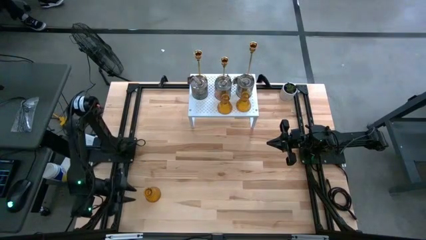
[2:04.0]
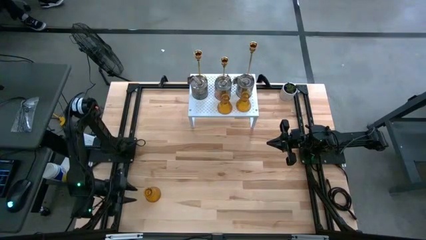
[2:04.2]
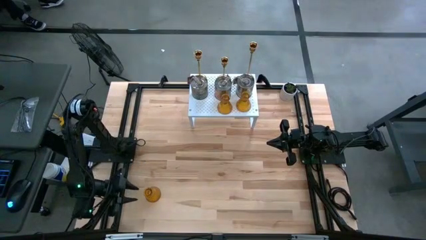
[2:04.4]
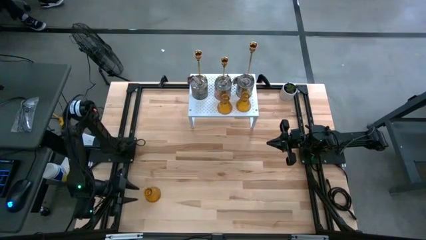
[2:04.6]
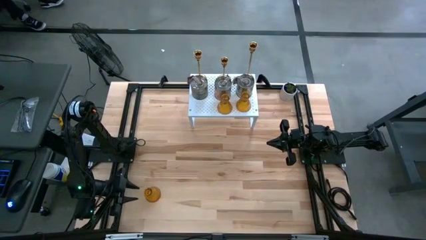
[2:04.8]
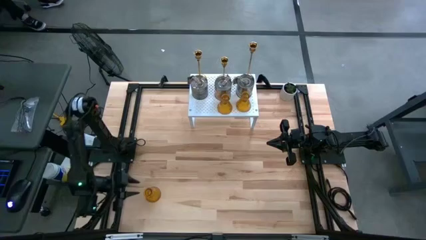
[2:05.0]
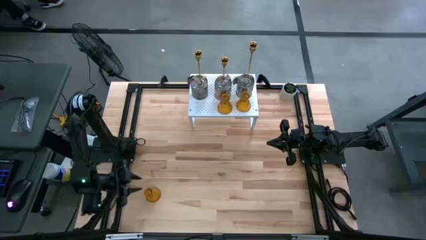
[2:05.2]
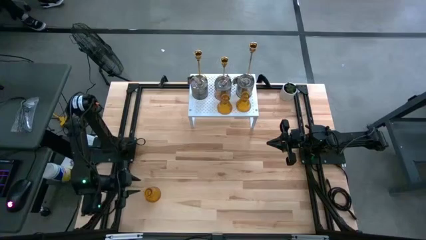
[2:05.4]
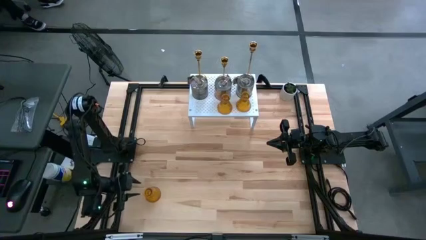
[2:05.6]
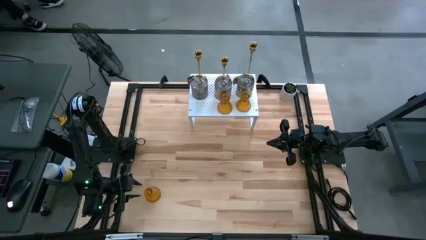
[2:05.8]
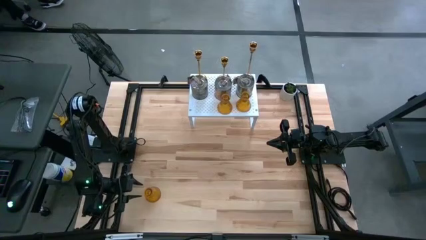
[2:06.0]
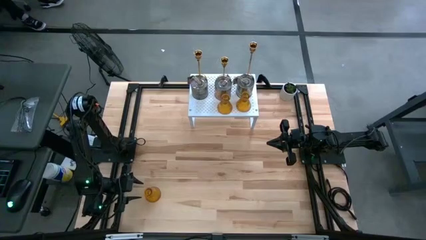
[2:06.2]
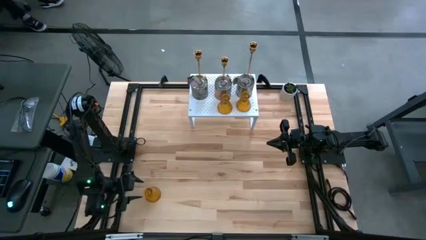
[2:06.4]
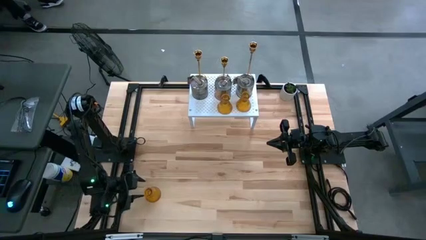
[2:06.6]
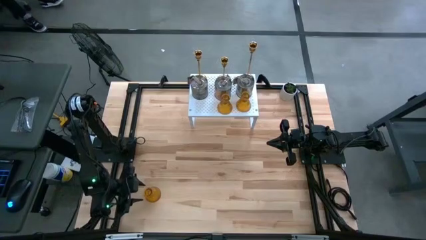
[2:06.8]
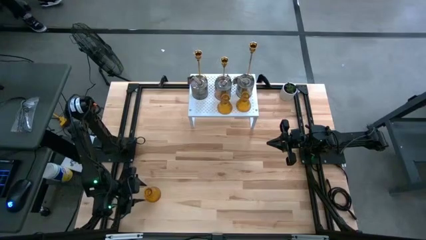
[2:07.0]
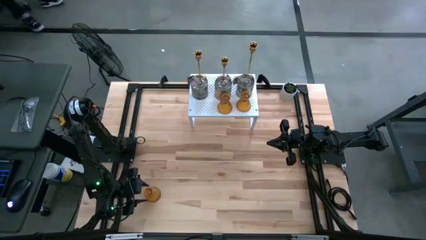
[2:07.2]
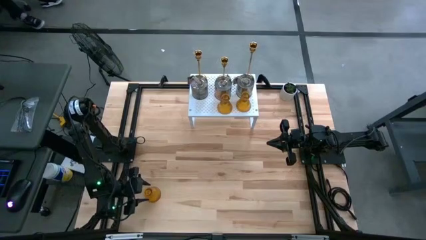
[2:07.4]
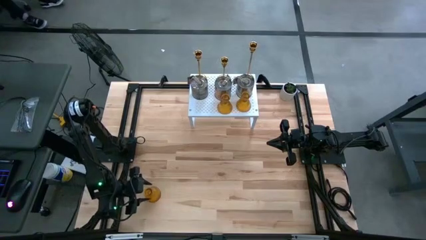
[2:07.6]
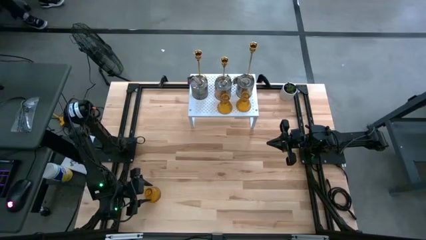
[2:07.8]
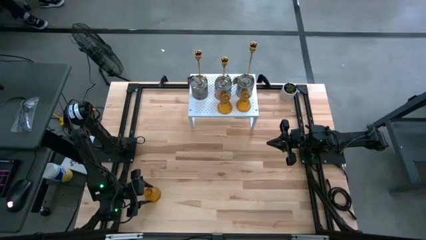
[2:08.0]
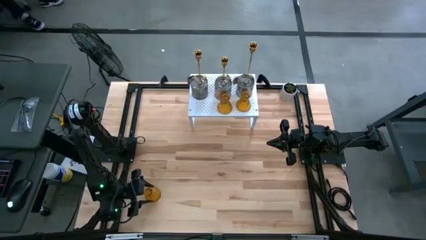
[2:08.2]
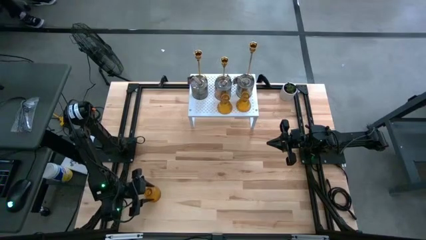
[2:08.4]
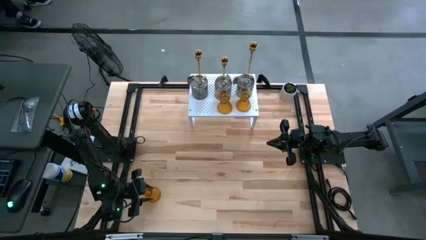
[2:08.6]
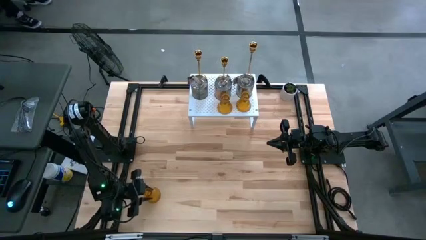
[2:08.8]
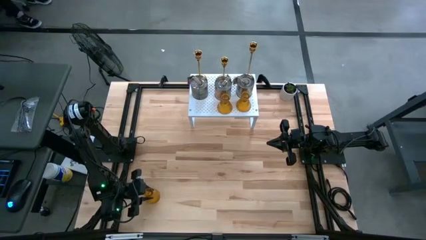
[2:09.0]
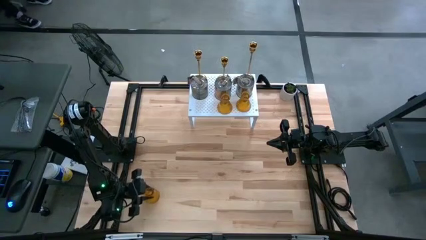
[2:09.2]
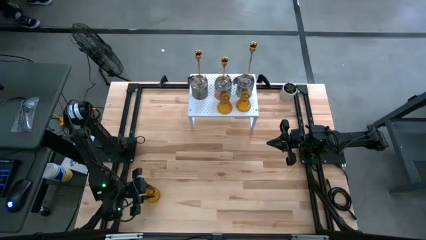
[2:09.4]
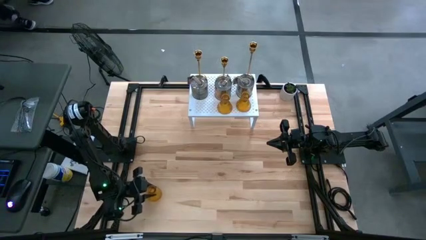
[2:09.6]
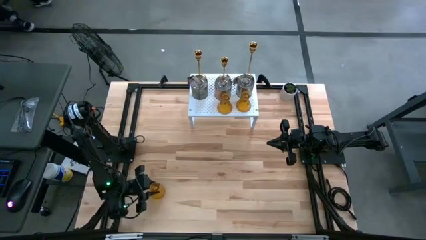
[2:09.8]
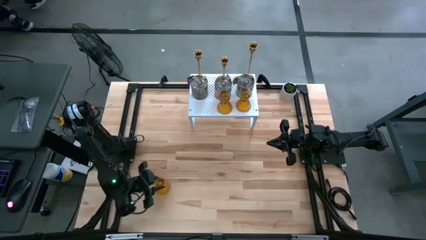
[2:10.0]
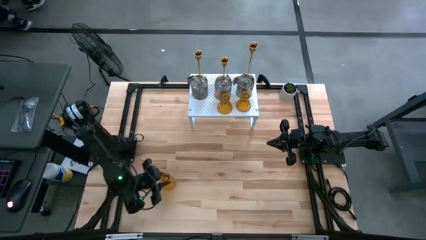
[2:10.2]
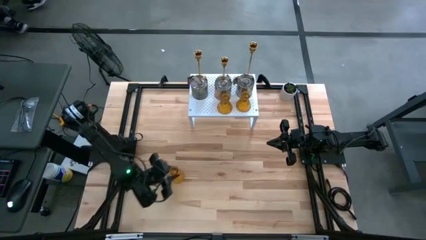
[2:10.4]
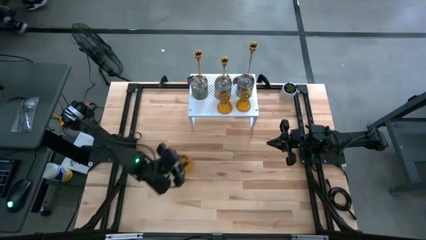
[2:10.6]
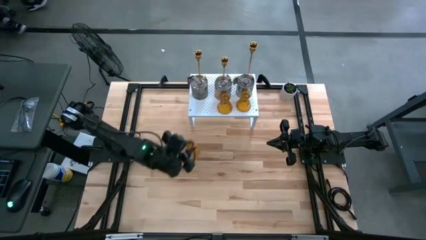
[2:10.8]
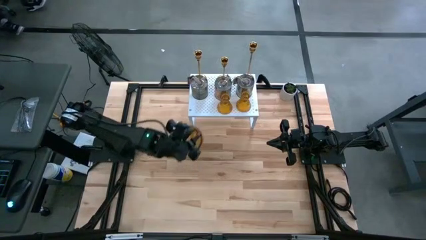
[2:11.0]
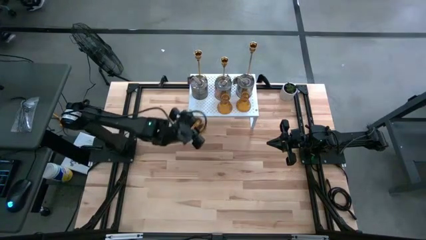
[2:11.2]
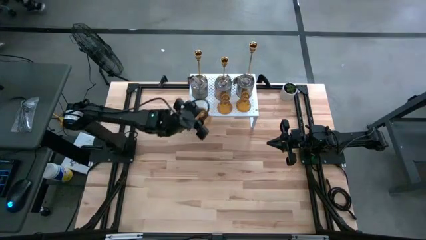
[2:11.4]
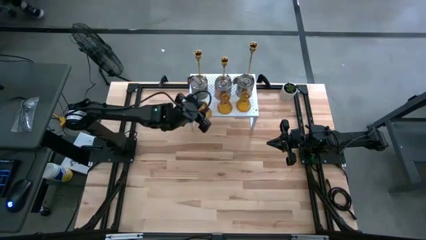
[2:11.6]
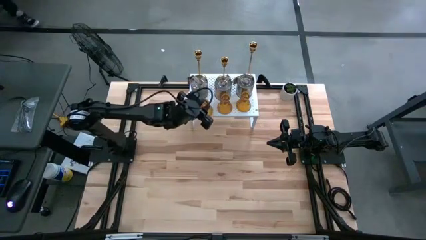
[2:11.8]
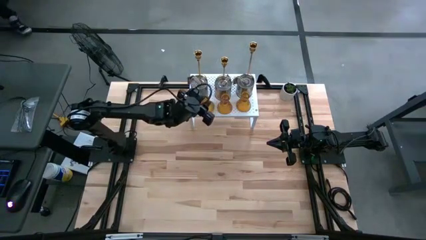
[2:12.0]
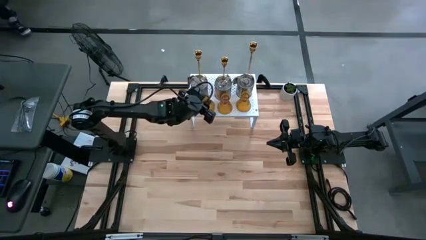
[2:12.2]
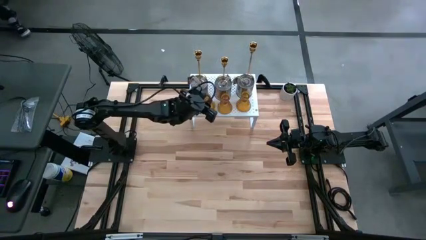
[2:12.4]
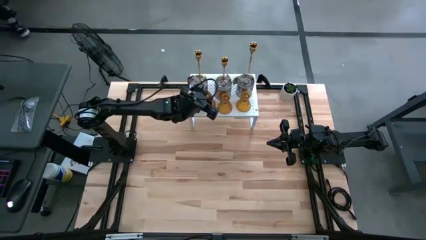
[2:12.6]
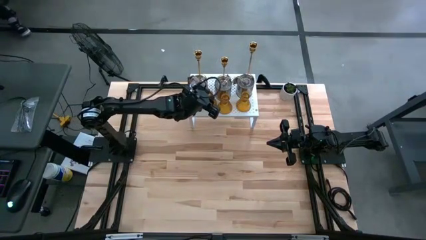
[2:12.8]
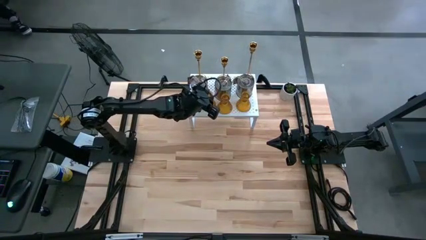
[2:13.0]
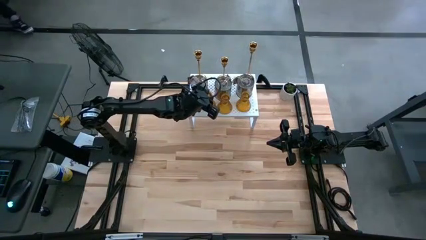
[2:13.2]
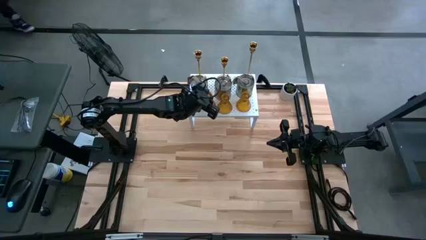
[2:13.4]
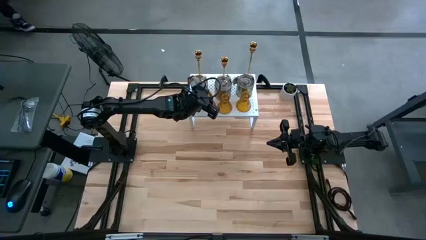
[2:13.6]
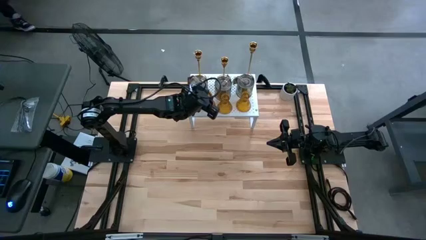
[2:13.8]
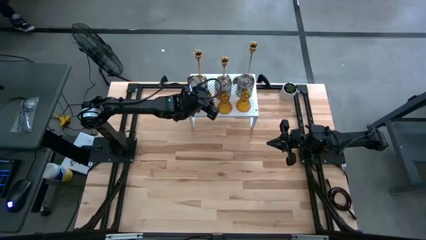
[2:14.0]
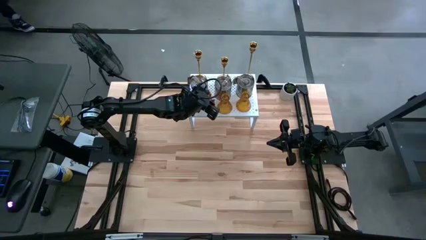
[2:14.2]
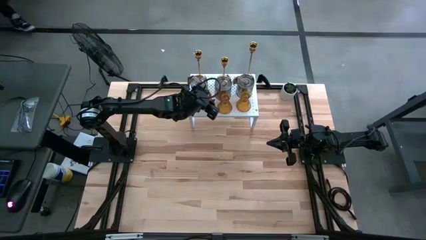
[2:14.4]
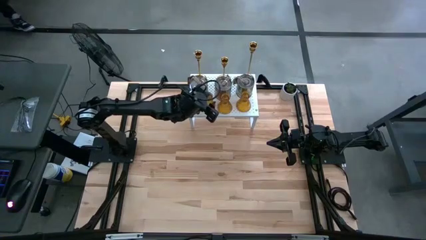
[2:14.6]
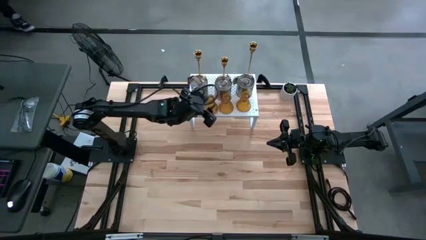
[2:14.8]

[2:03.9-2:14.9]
Task: Pick & Place candle stick holders
Put the brown glass candle holder on the shelf

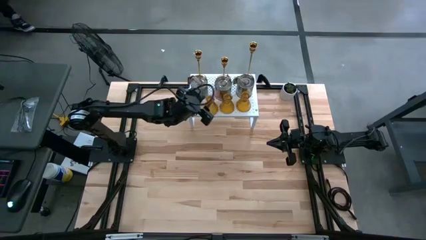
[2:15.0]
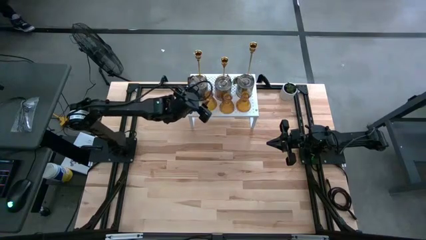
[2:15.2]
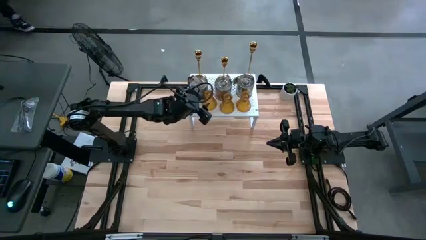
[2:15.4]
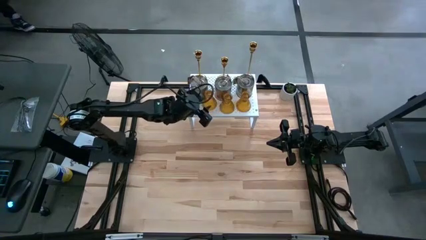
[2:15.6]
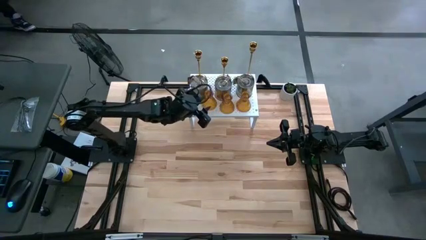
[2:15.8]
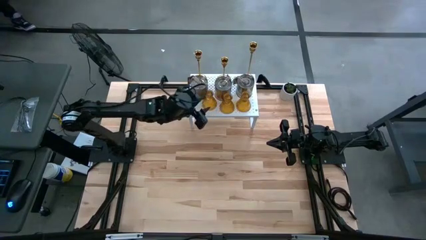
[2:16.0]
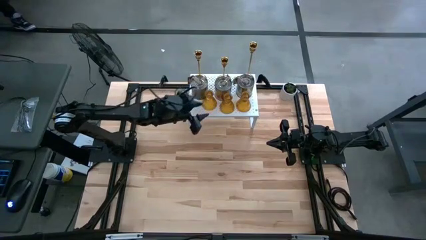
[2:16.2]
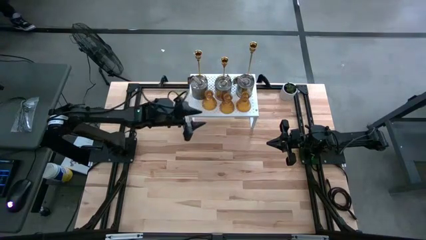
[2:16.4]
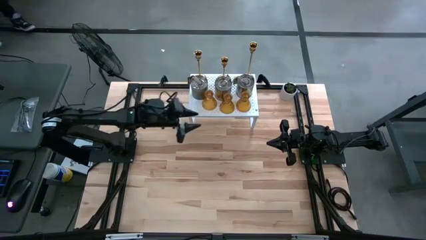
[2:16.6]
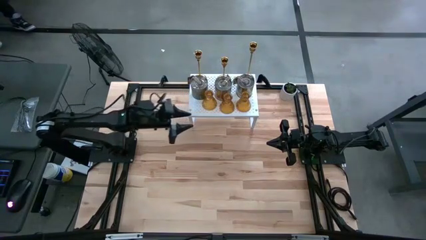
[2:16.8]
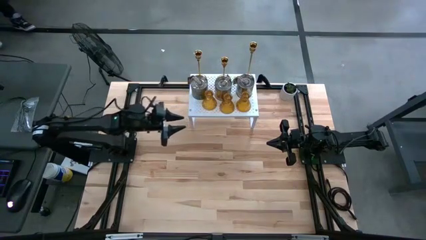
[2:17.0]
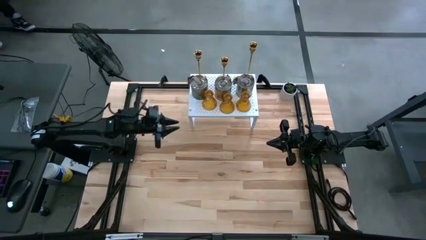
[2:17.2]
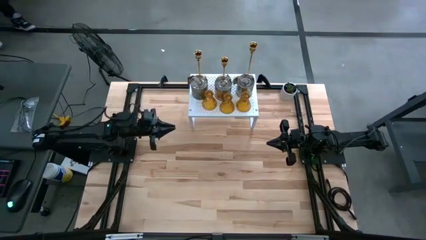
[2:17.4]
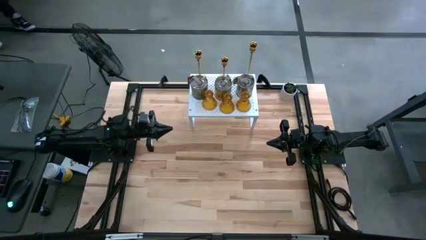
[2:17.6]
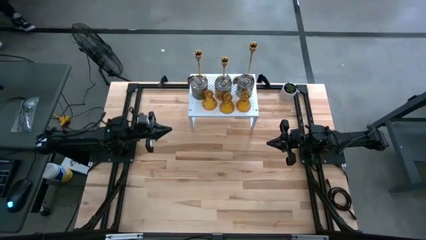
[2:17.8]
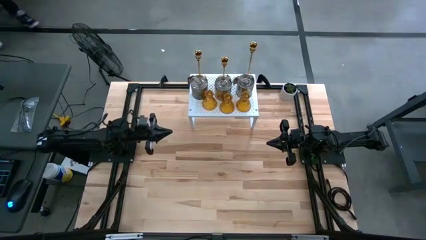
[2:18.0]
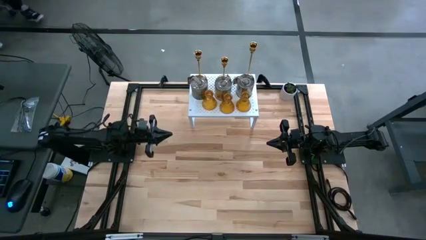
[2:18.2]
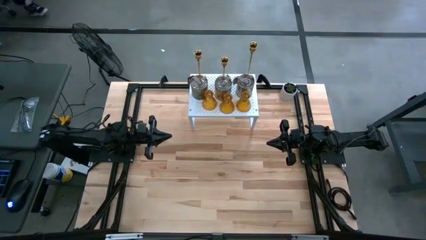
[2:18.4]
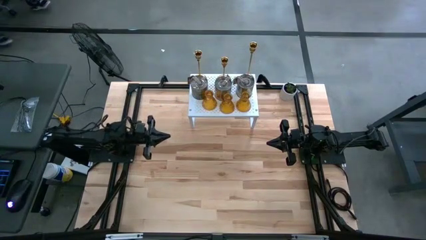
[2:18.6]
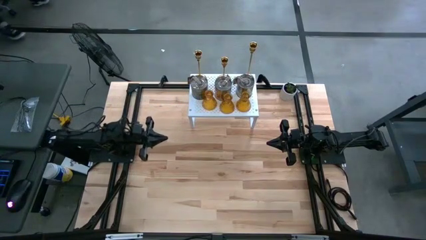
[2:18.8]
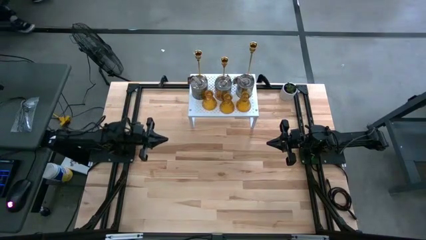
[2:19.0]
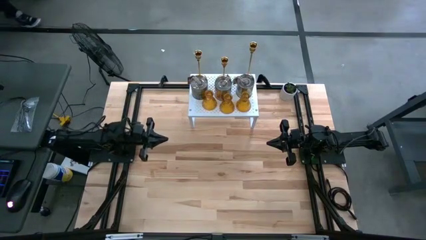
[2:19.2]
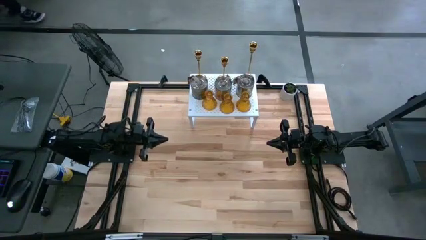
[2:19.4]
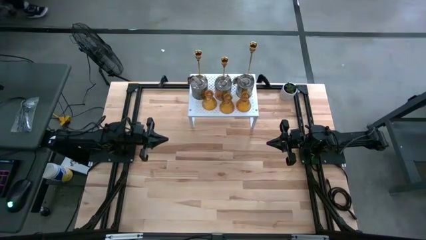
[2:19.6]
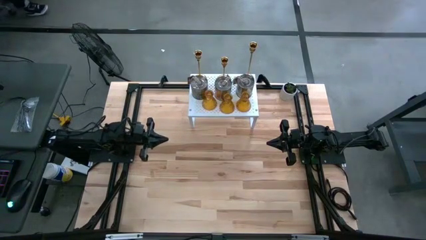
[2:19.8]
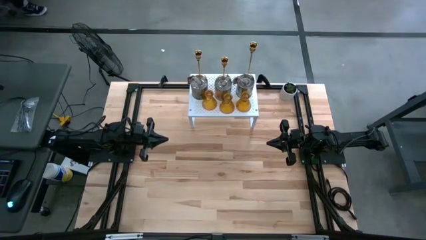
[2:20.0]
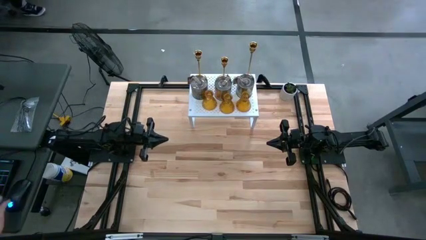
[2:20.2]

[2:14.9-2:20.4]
Return to Home Position
